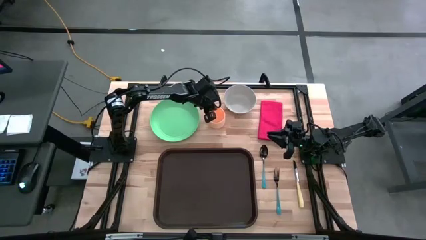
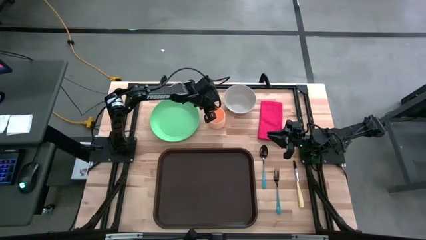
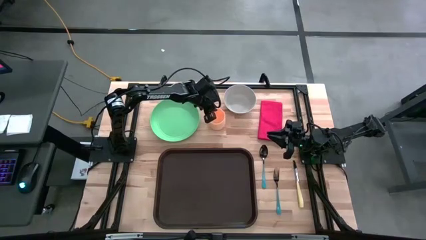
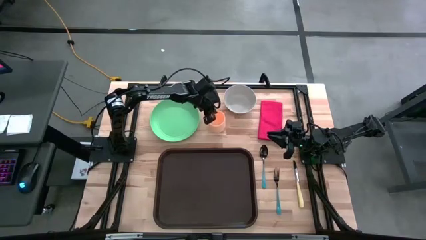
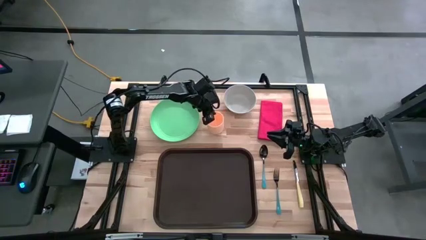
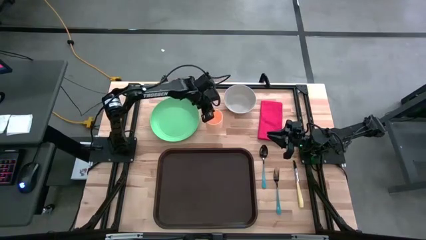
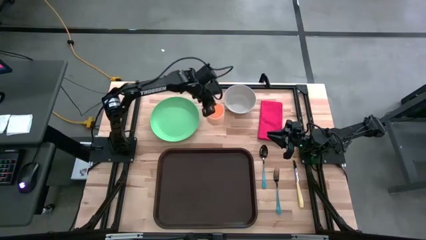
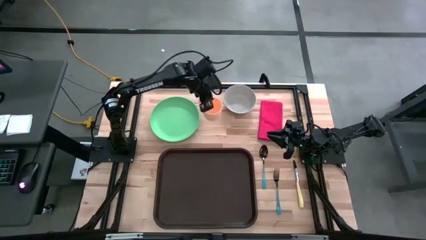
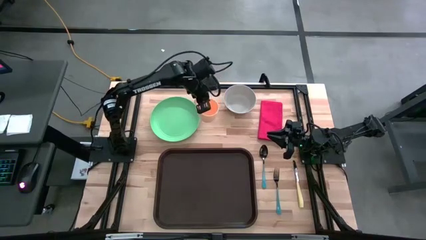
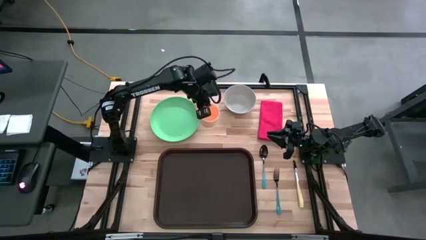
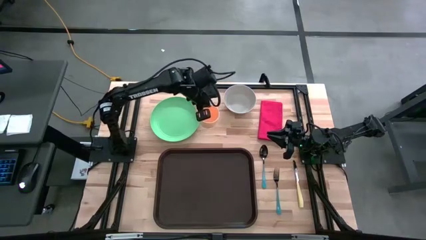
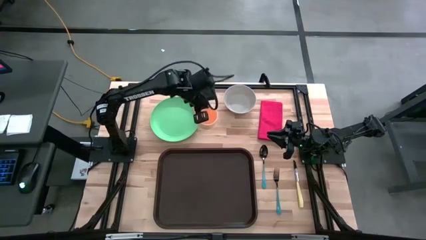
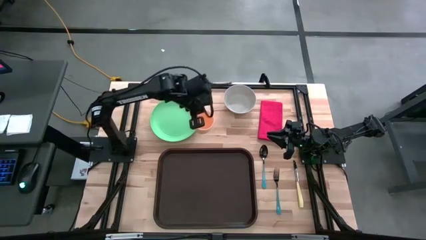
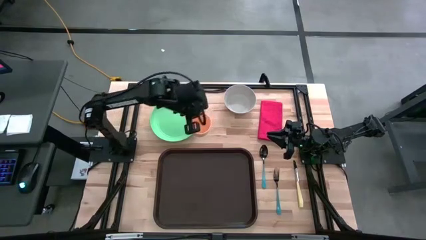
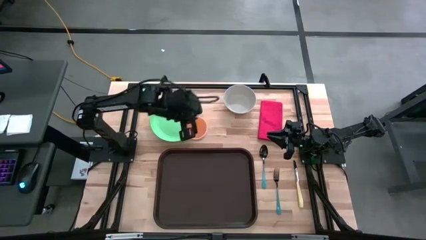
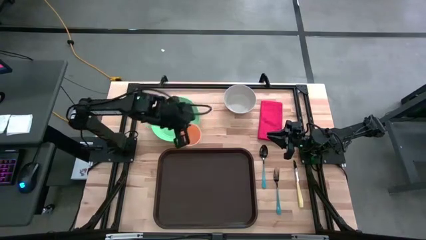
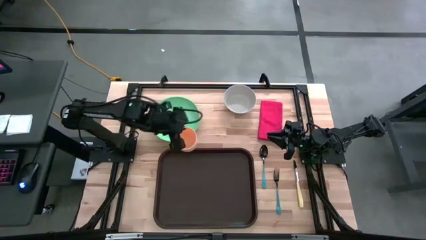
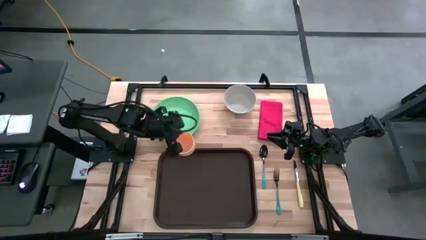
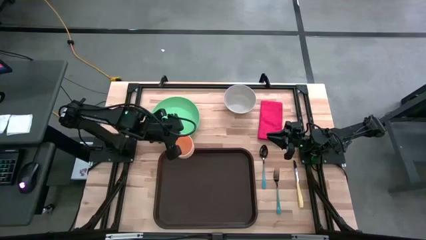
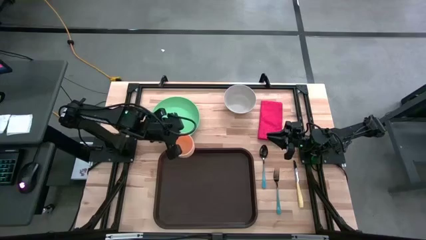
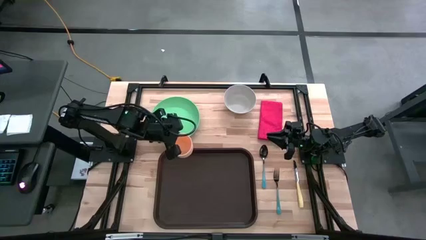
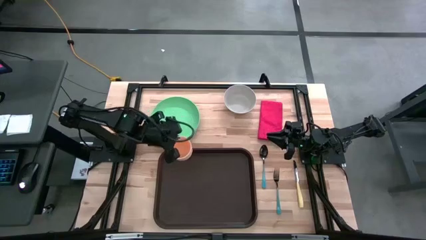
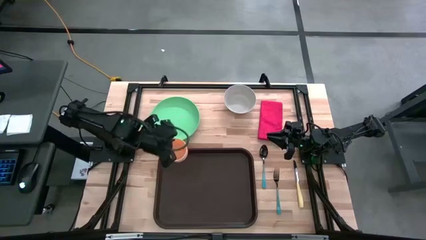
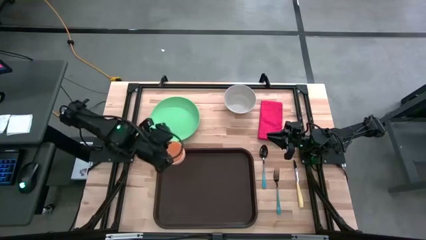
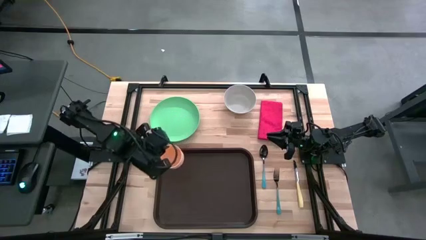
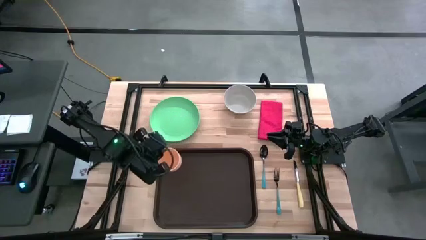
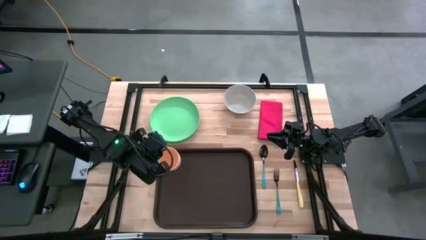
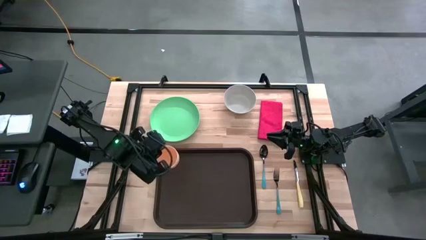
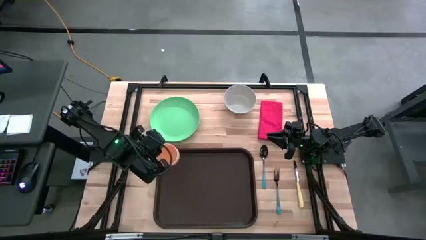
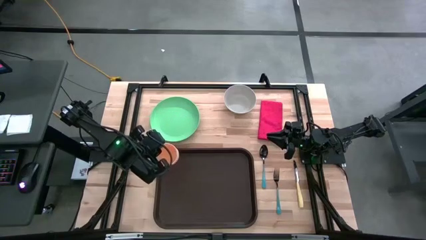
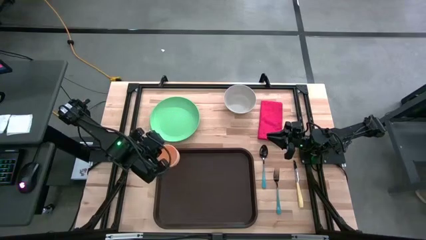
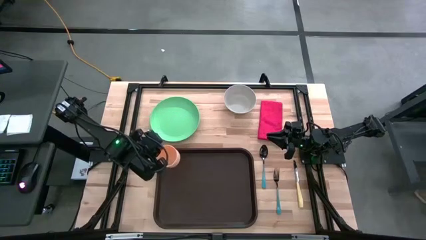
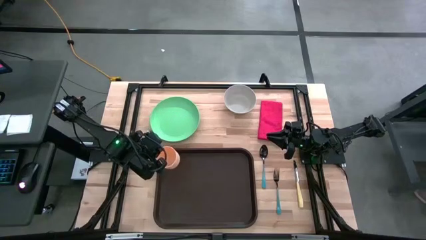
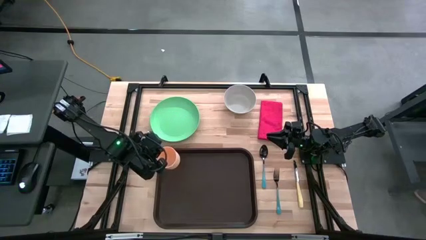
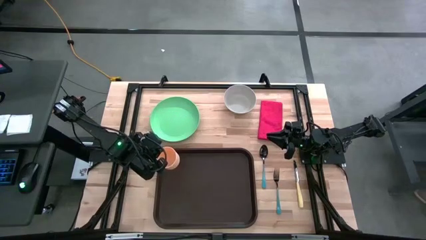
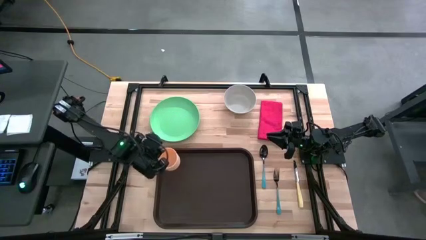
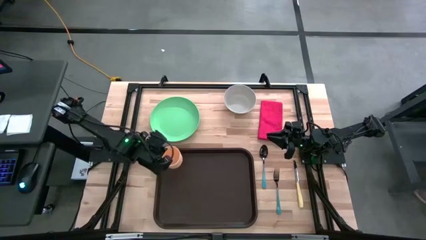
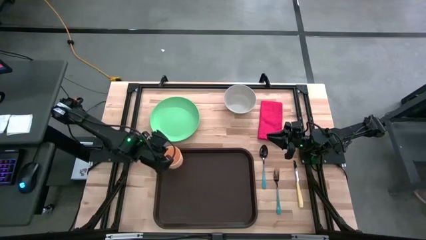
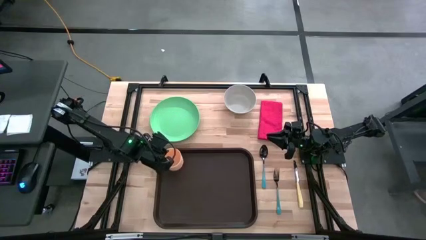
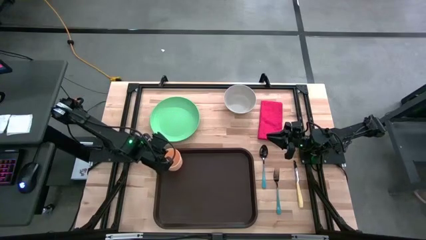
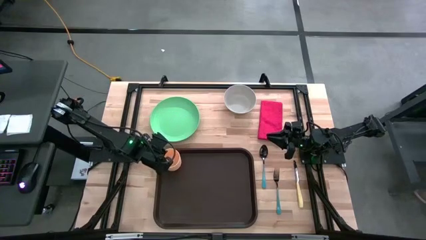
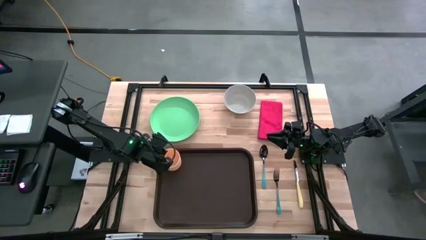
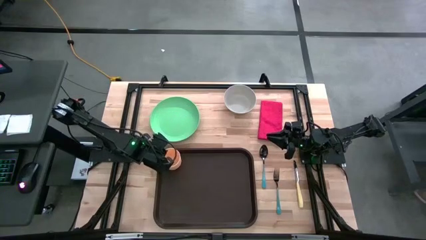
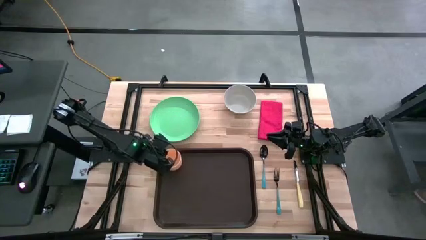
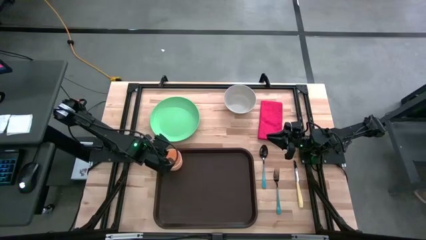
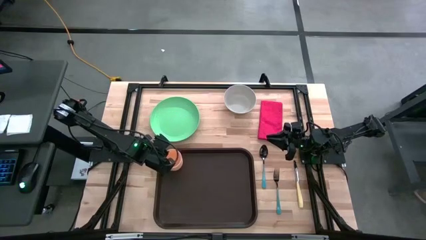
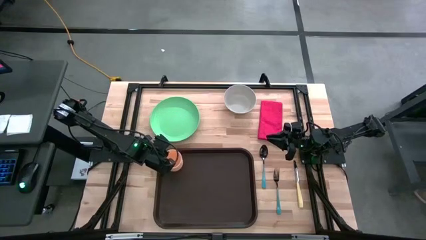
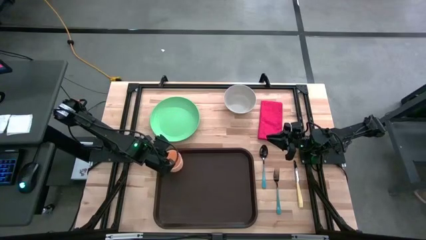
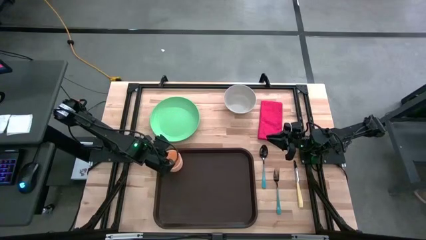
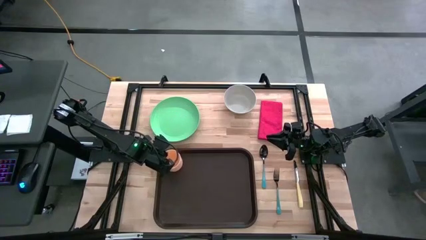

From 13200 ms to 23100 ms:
Task: Set up tray
Put the orange cup on the brown tray

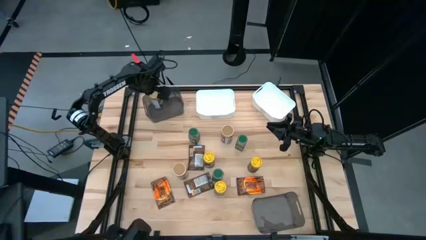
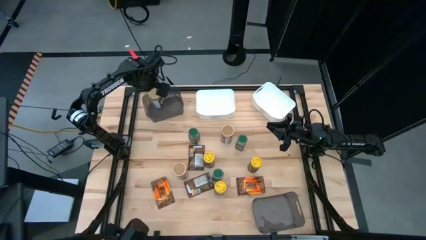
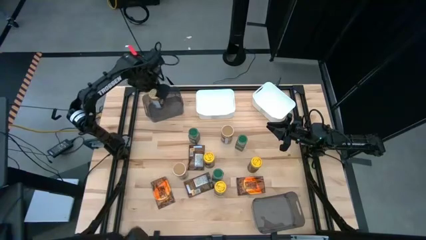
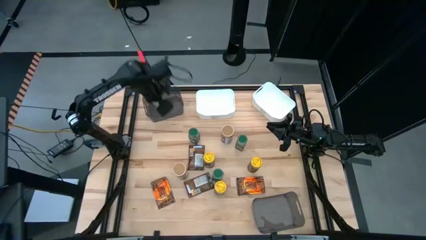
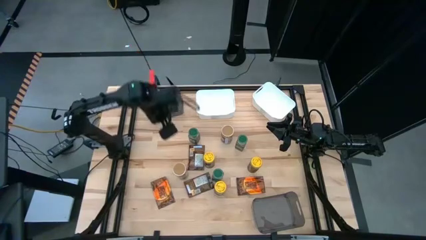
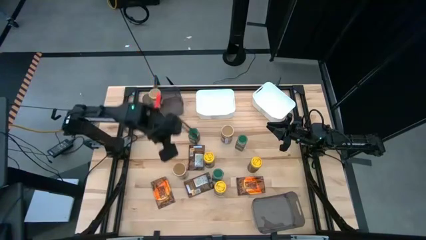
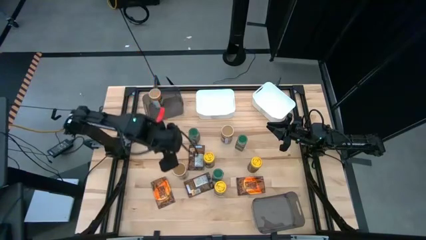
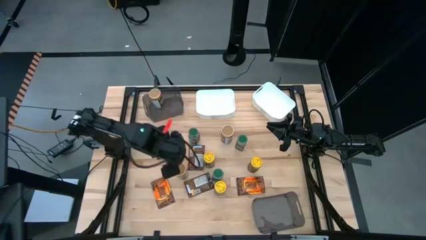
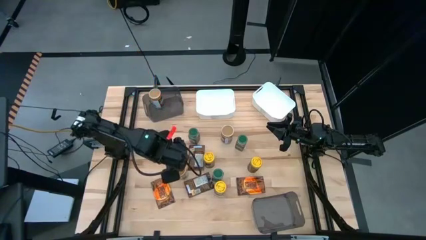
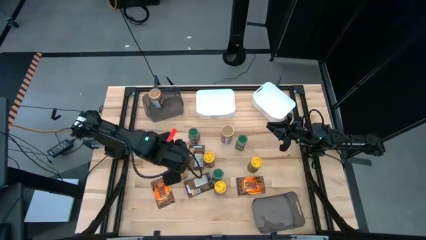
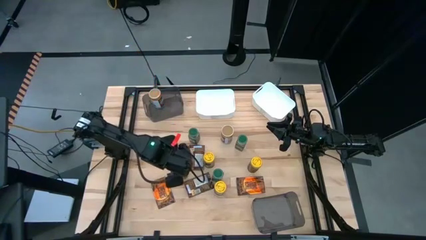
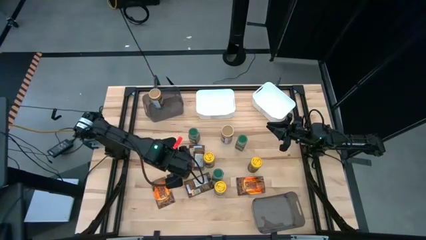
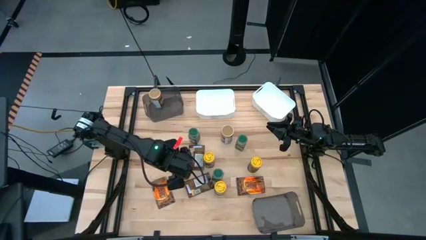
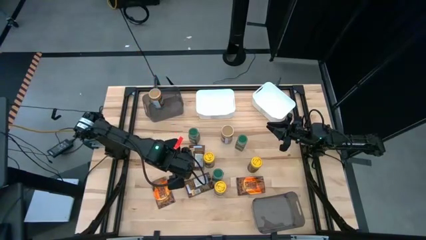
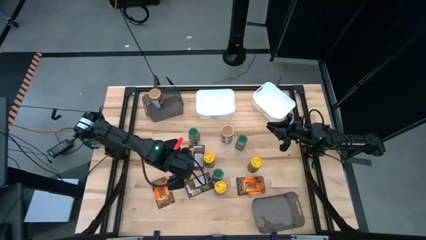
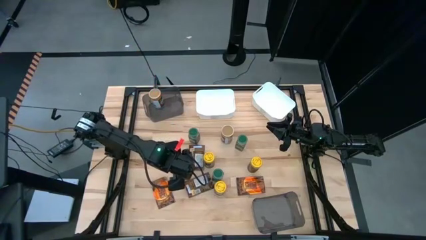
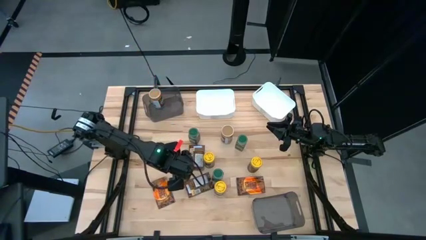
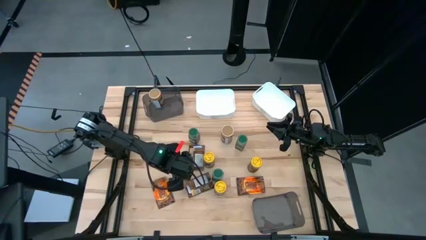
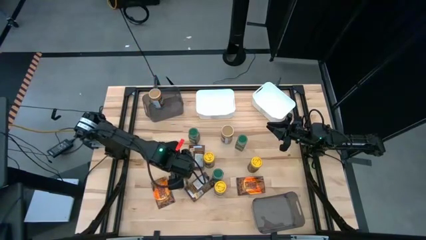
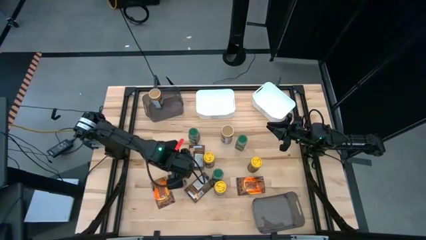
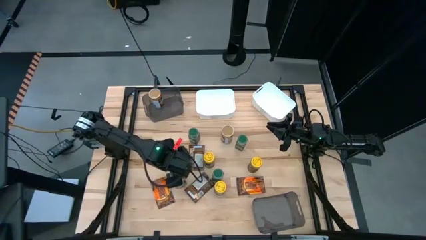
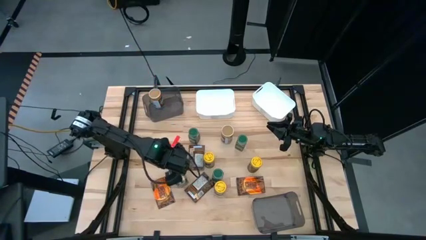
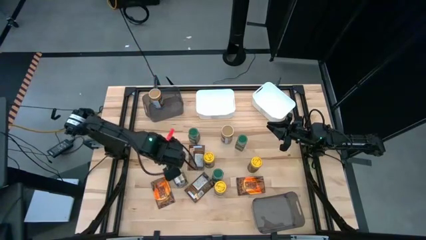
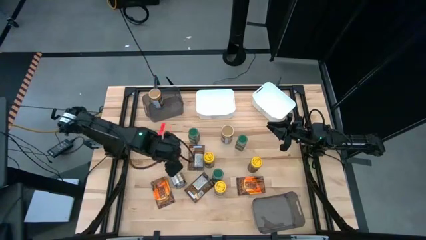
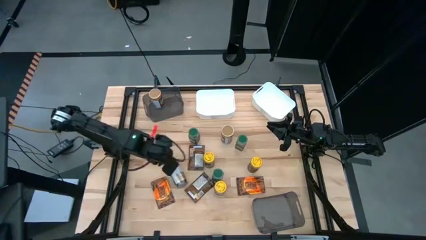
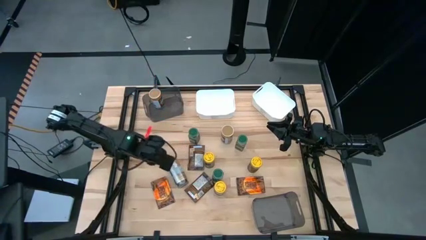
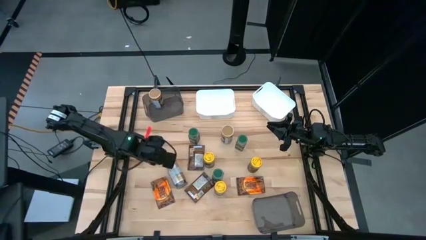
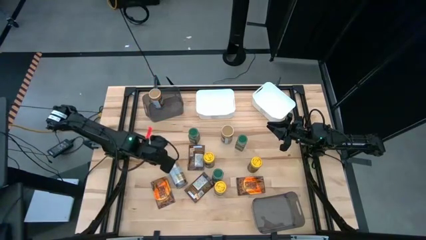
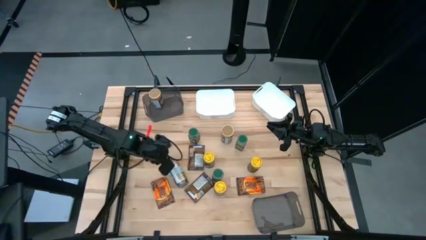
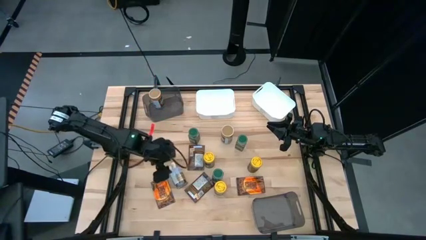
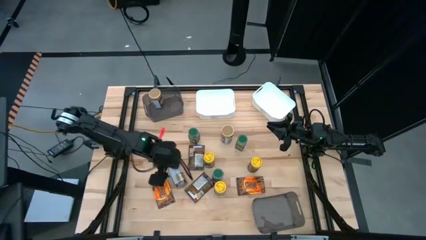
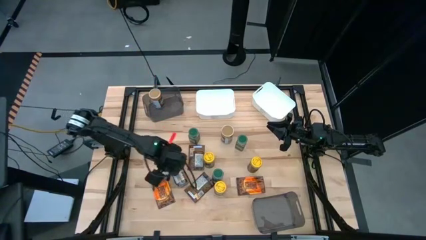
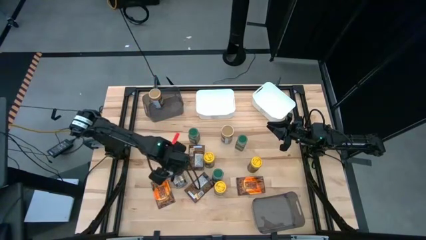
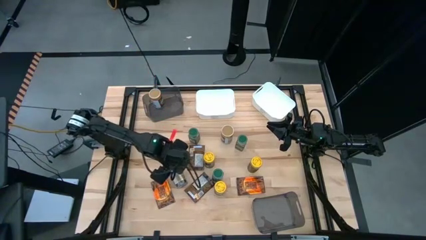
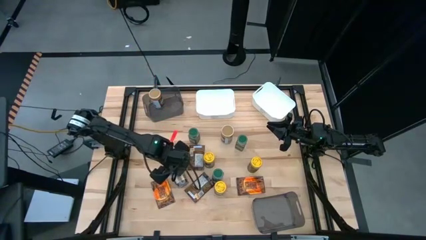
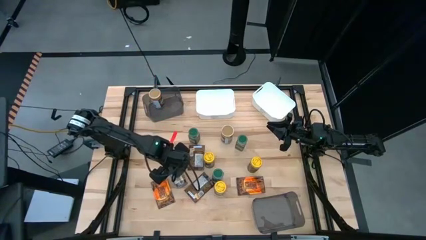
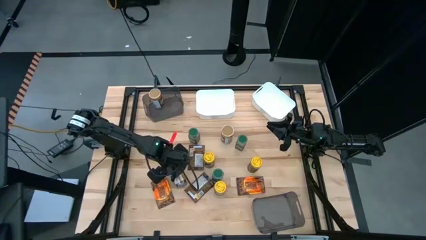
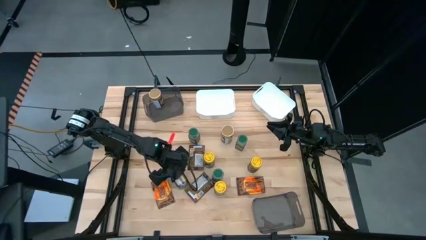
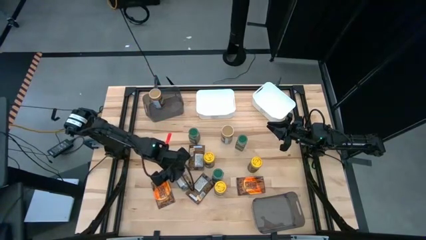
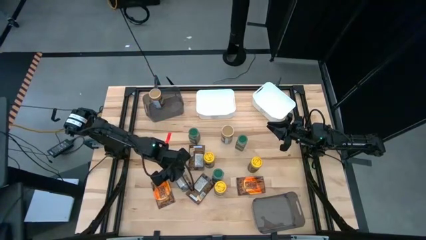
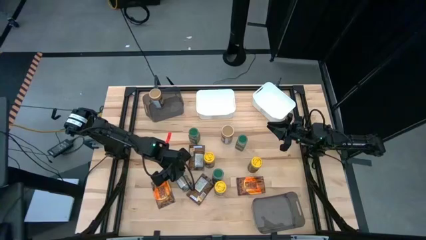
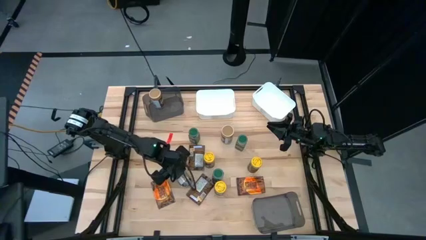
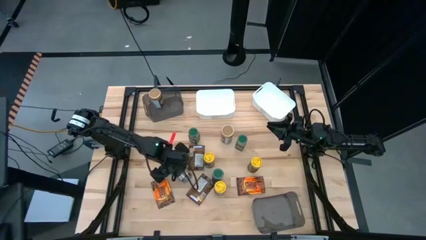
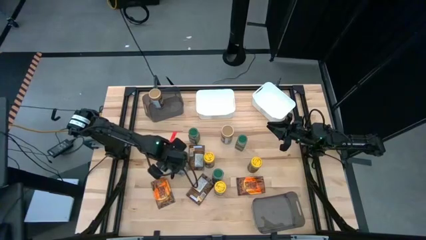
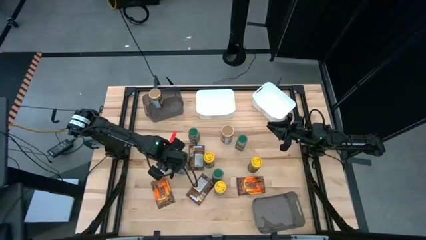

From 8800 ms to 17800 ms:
Task: Sort spices by type
Put the gold seasoning bottle into the top black bin
